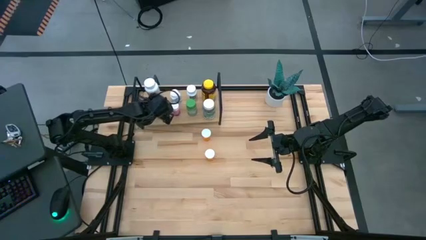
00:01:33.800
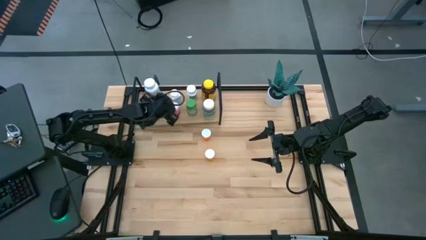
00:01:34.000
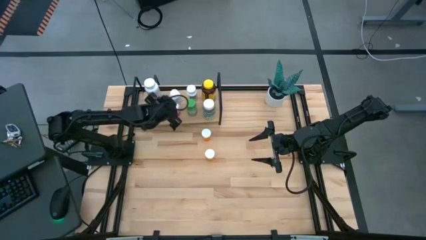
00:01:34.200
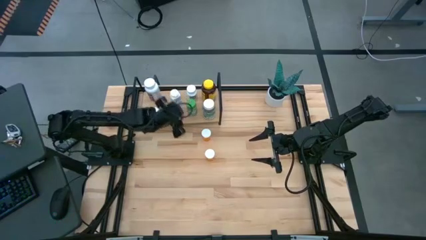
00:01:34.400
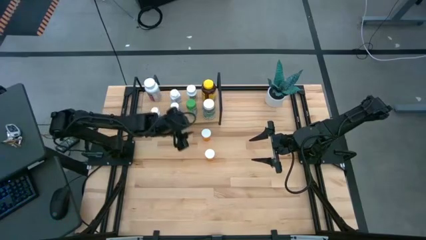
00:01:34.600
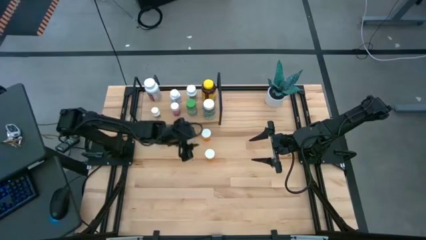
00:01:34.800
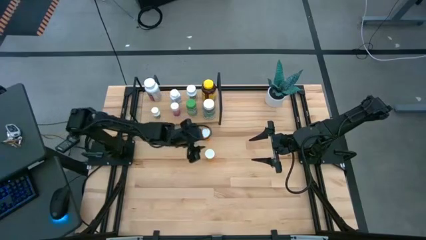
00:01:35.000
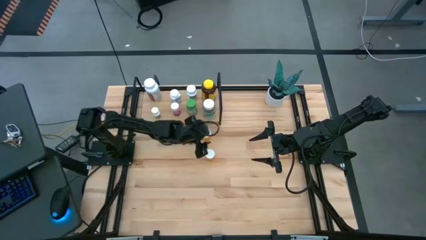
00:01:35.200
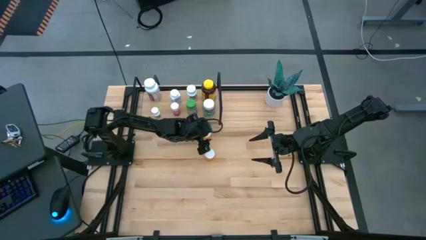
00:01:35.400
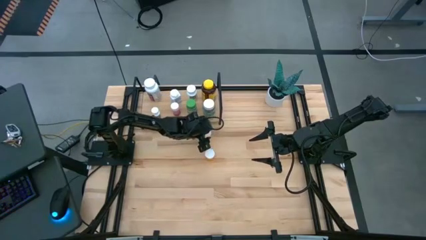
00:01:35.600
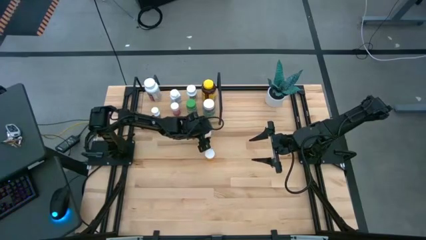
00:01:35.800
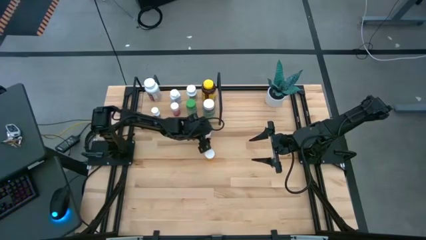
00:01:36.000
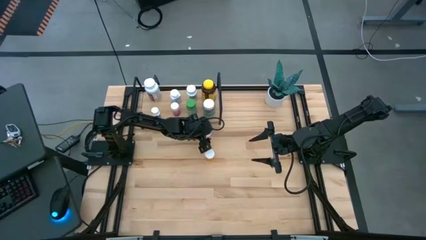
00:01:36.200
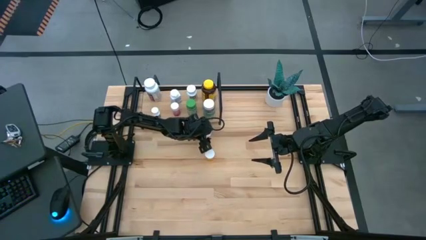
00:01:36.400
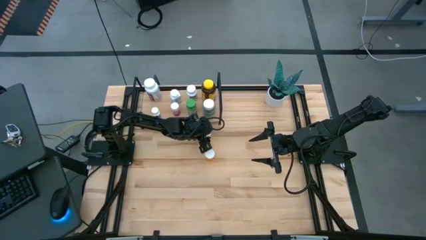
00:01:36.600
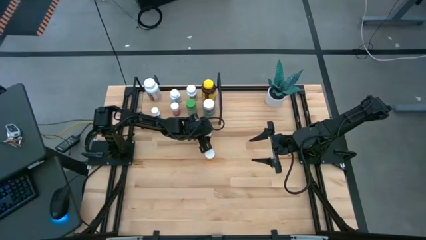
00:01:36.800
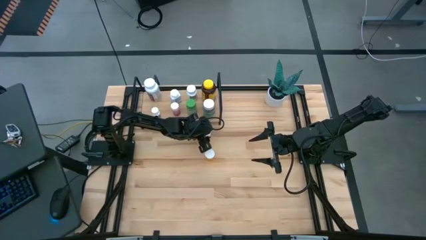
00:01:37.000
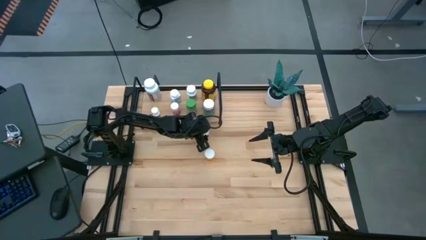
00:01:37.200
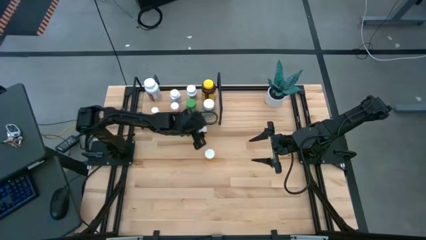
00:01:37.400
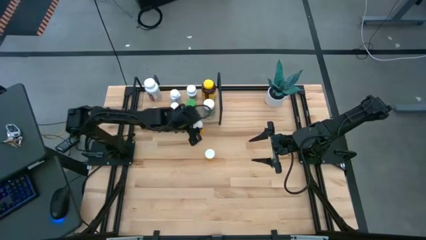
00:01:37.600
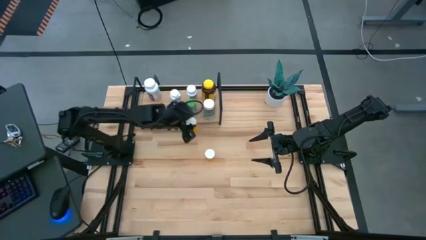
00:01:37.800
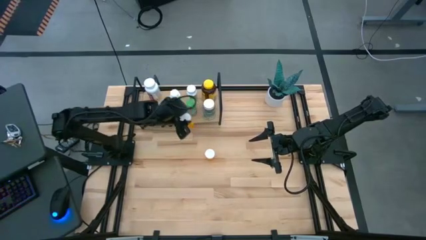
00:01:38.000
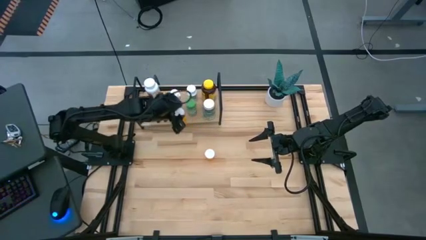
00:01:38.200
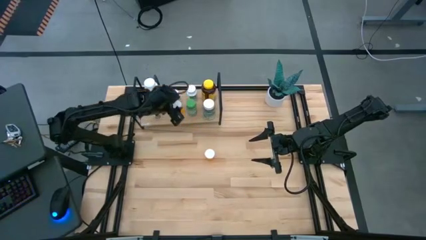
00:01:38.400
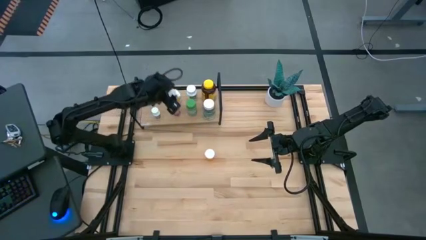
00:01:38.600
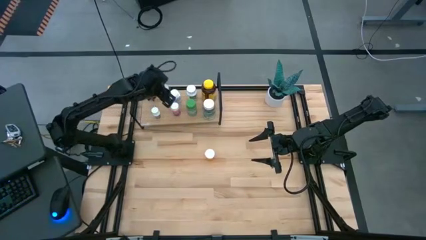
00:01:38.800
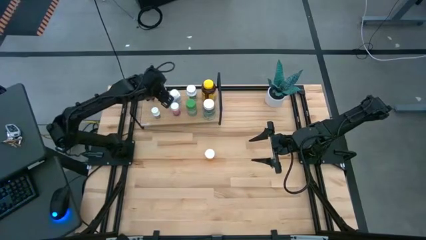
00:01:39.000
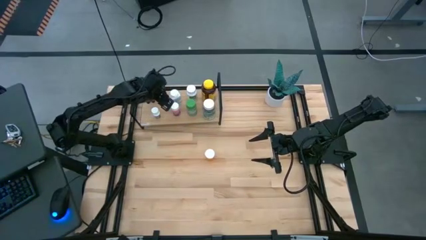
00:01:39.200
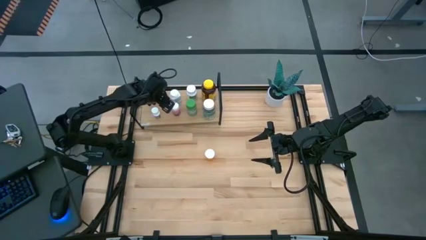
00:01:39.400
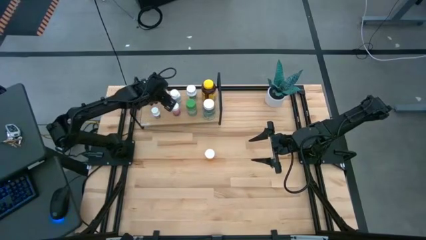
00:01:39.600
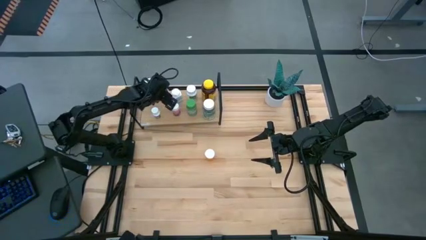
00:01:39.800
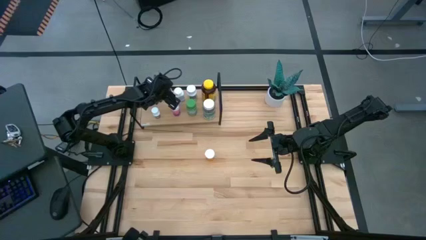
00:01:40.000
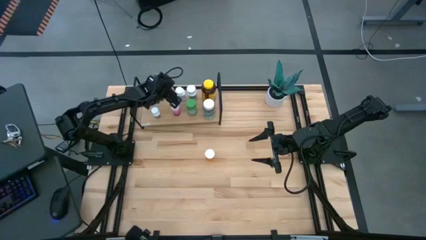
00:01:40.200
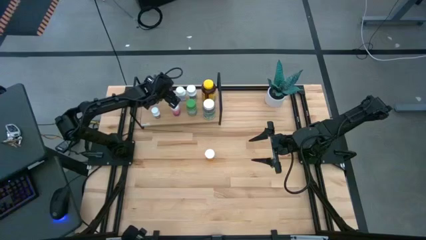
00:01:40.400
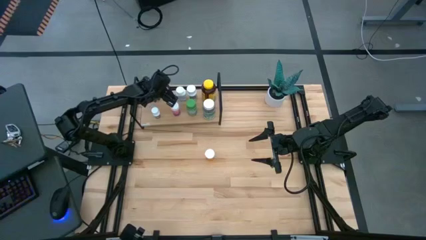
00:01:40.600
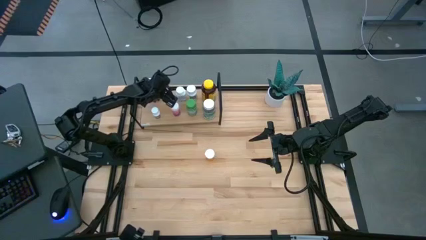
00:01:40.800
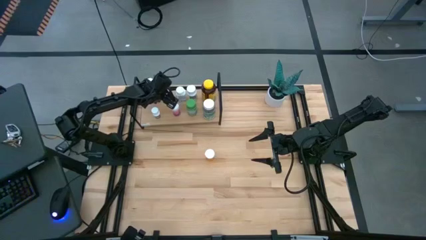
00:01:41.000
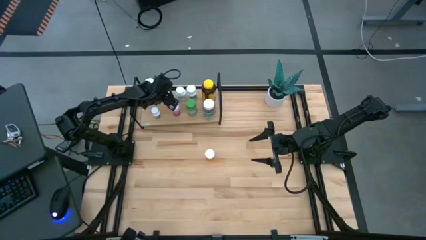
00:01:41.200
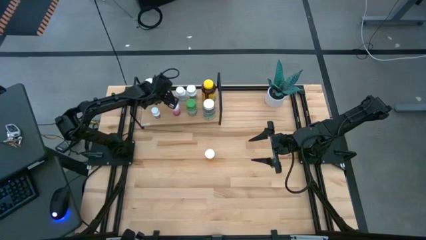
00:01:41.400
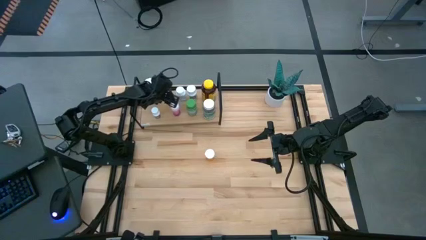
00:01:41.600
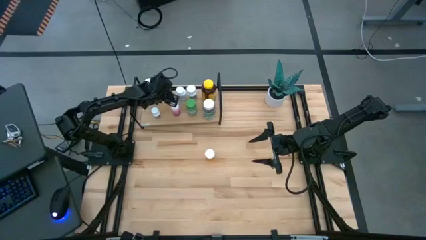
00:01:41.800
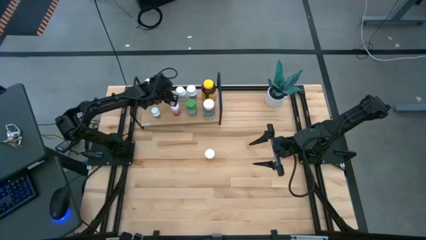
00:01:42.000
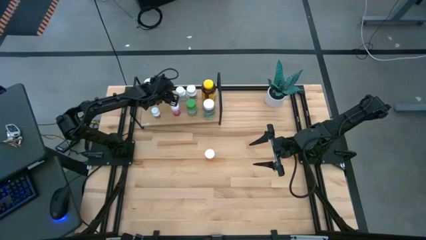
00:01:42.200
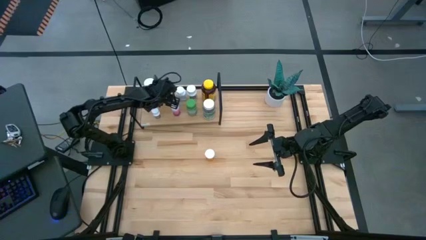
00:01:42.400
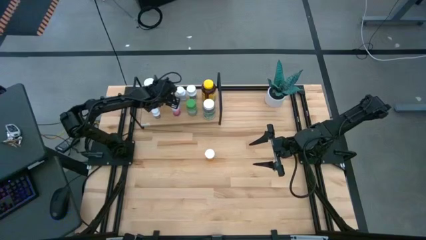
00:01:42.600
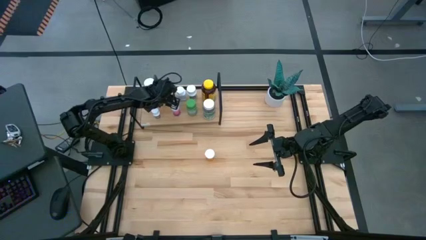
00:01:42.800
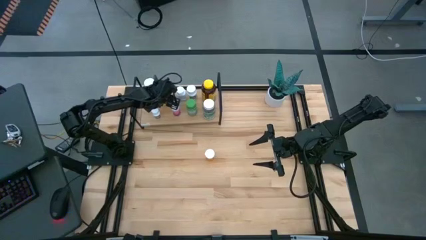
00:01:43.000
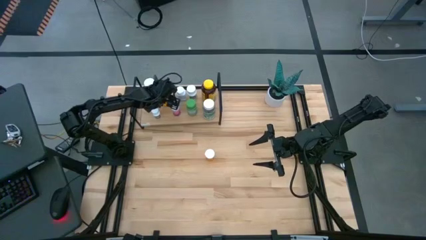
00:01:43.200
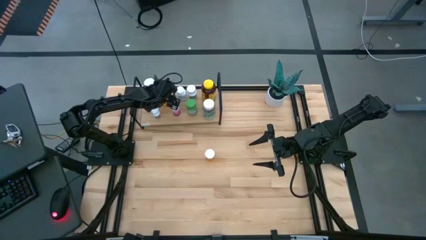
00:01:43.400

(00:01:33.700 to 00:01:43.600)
Task: Pick and place medicine bottles onto shelf by color
Put the top orange pill bottle on the shelf

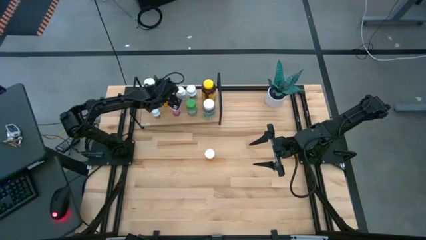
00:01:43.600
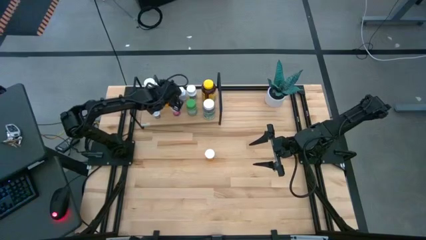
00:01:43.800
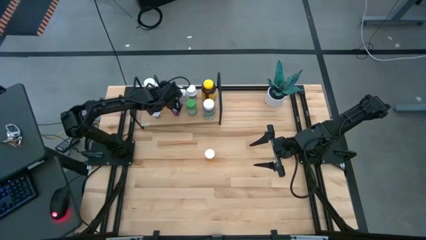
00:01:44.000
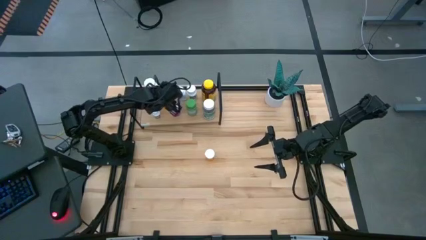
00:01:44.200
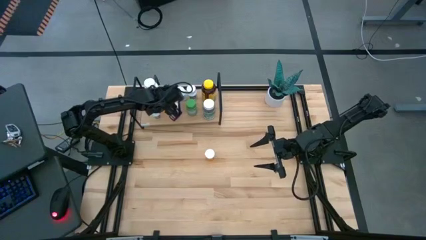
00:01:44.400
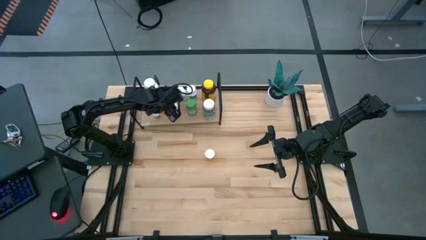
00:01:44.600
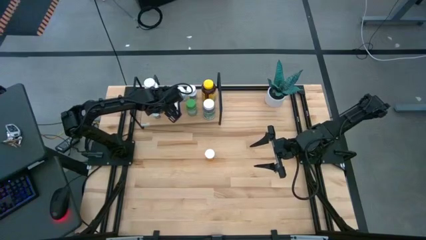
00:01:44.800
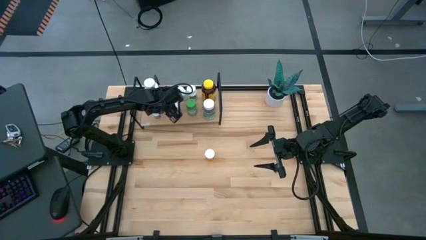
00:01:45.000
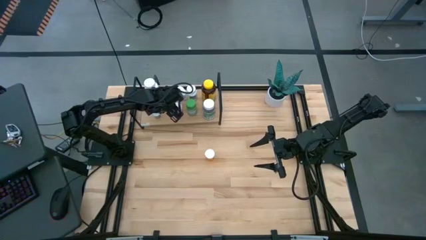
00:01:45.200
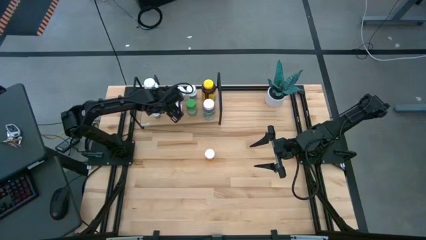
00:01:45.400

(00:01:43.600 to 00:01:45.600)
Adjust the pink pill bottle on the shelf

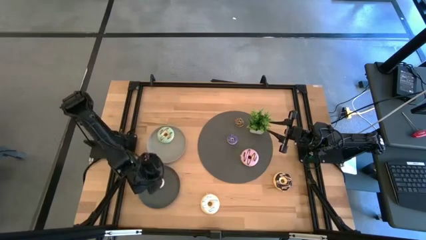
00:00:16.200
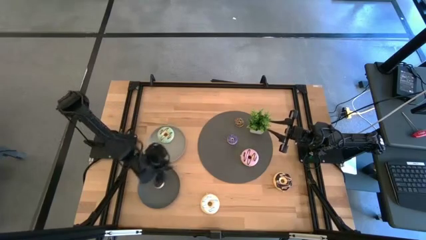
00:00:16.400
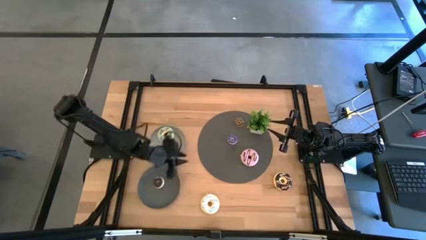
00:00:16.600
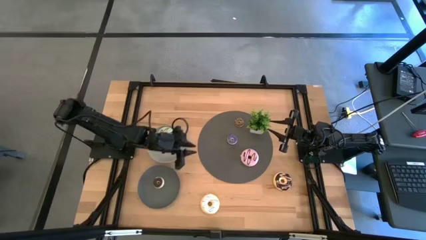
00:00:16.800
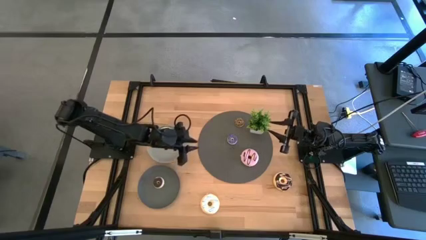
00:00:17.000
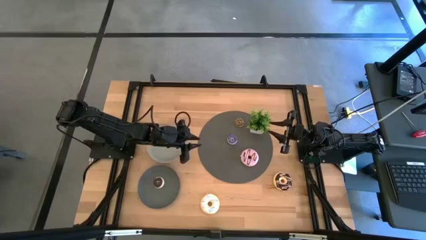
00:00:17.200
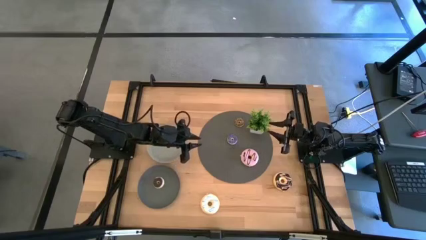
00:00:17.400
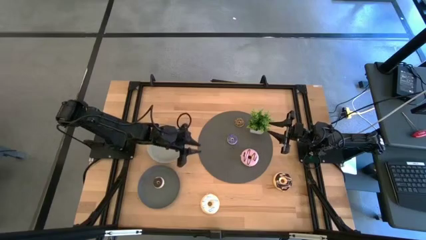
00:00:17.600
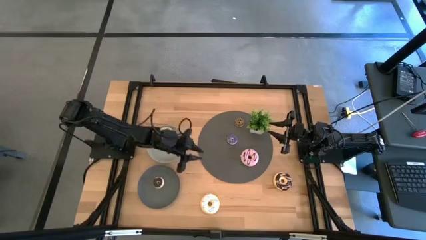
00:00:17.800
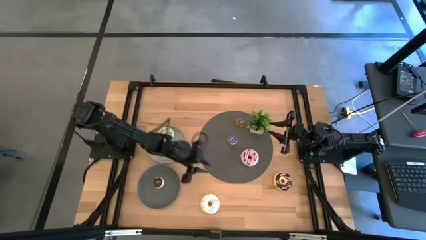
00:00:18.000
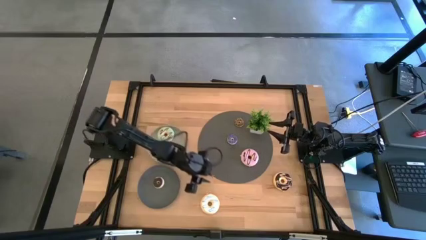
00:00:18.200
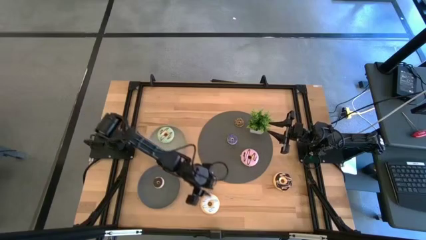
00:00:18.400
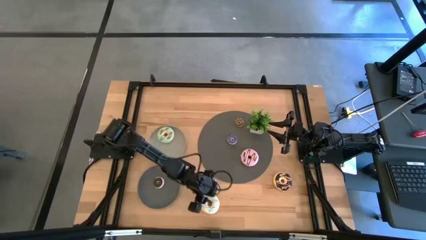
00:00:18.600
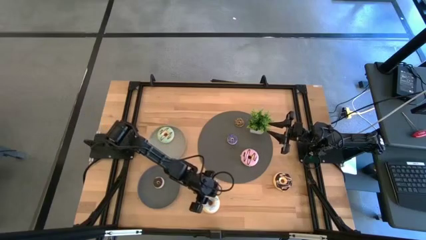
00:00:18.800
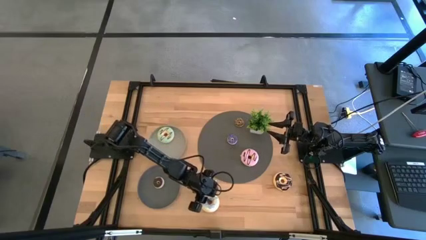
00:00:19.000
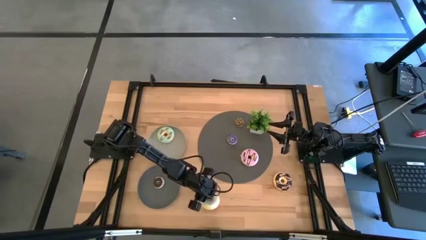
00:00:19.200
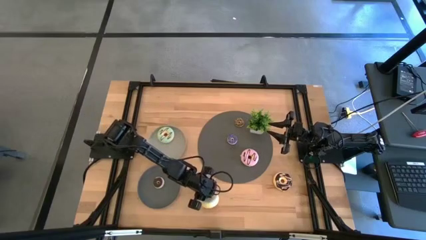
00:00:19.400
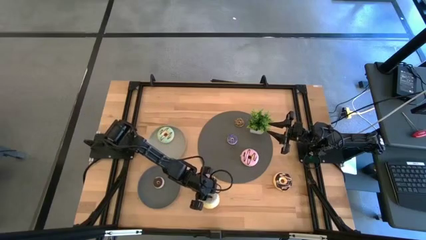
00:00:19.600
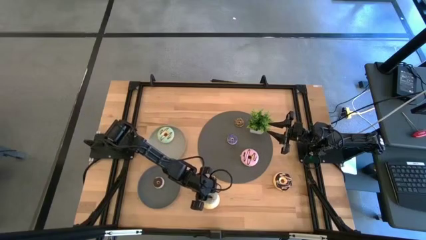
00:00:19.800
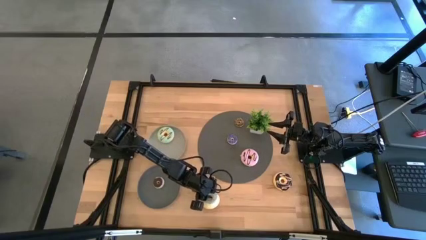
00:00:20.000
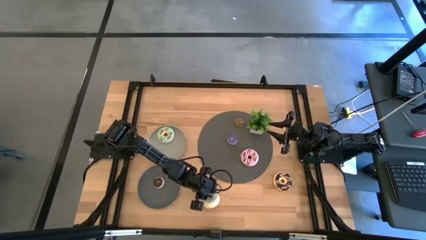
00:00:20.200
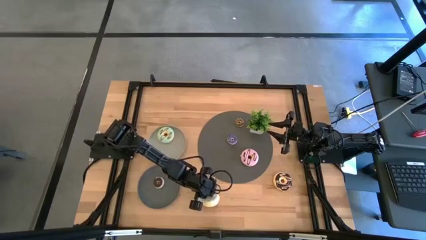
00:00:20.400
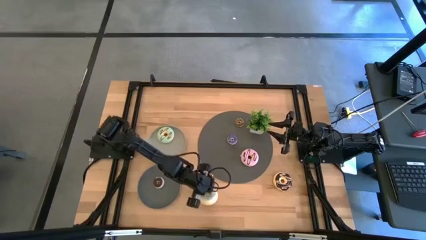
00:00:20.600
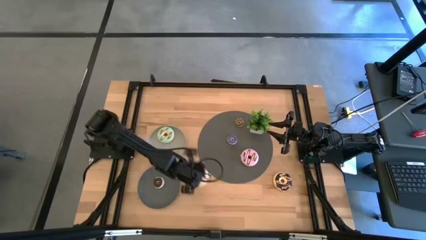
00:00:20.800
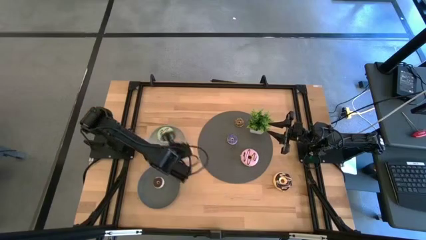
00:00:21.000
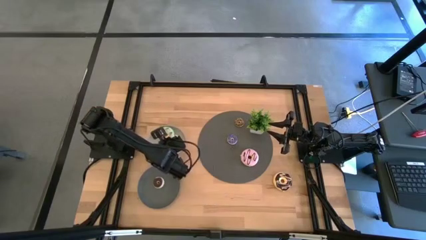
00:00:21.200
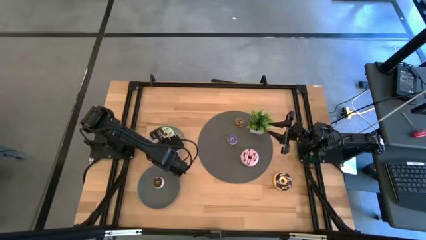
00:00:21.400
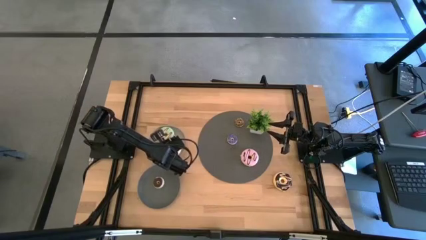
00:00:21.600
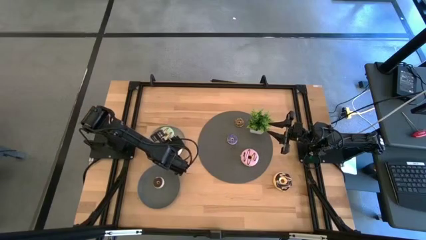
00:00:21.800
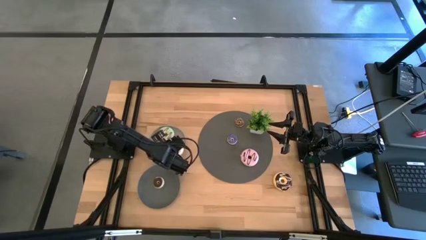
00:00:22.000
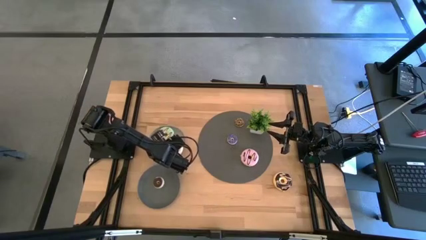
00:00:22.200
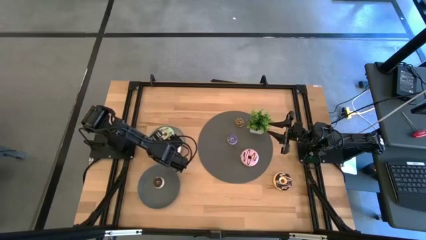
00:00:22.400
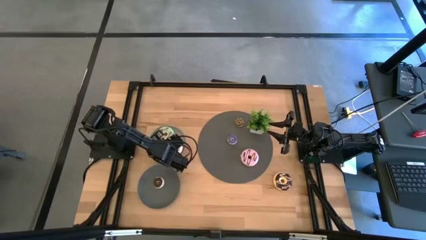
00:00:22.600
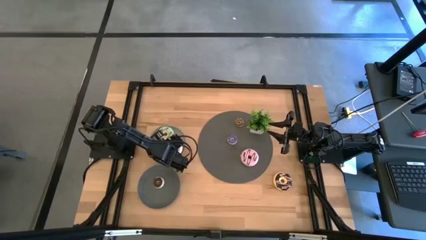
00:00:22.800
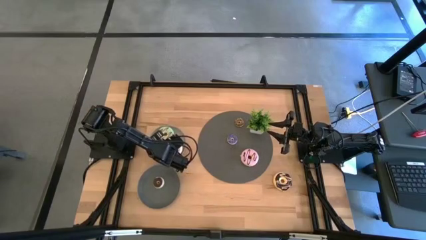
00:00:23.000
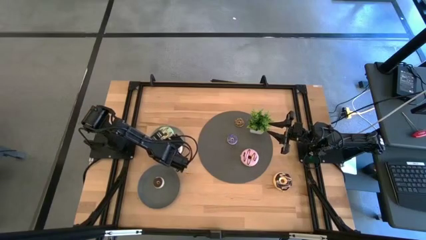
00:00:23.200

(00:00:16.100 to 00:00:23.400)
Task: Pick & Place donuts
Put the big white donut on the light gray plate
